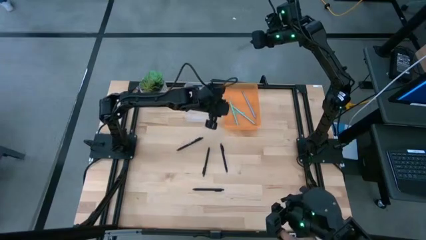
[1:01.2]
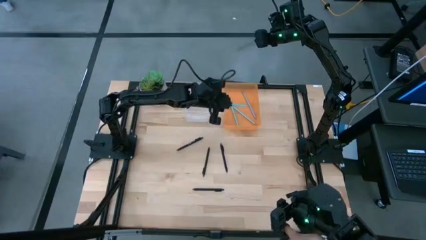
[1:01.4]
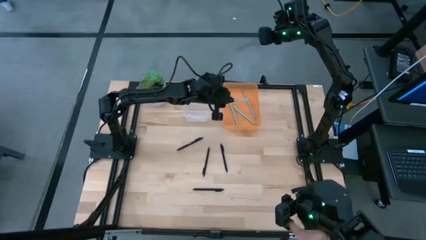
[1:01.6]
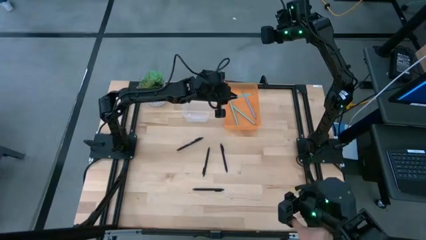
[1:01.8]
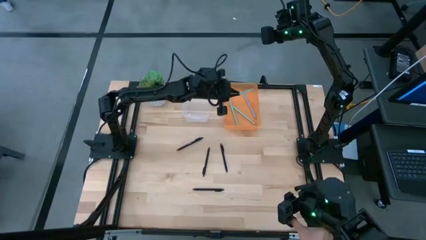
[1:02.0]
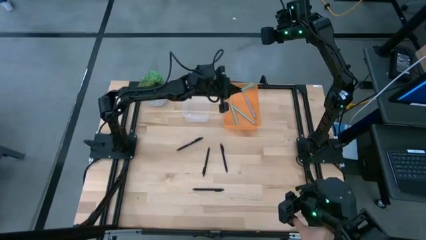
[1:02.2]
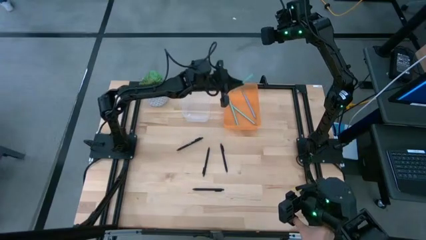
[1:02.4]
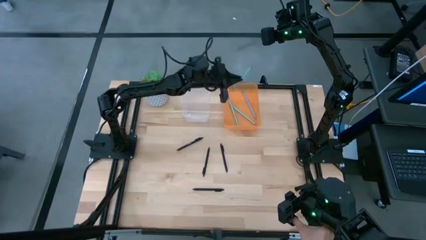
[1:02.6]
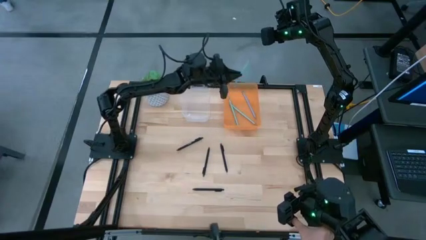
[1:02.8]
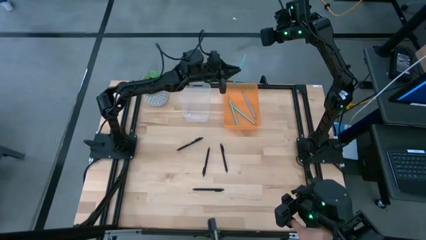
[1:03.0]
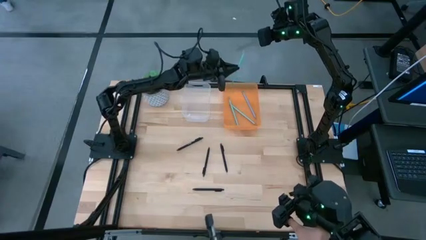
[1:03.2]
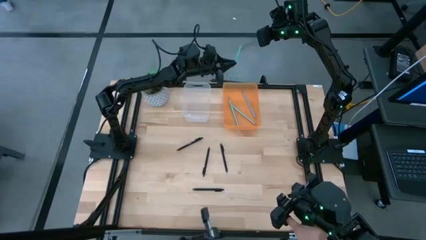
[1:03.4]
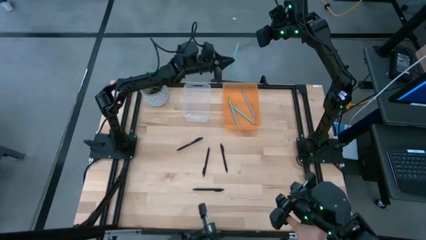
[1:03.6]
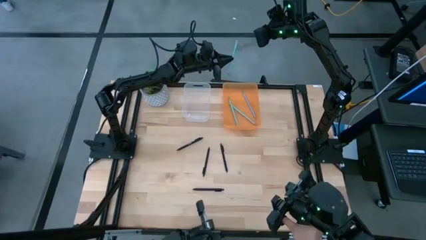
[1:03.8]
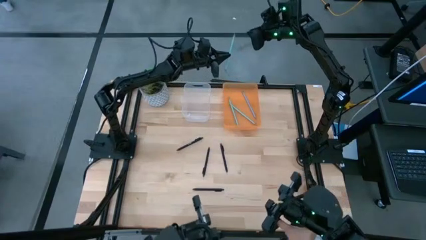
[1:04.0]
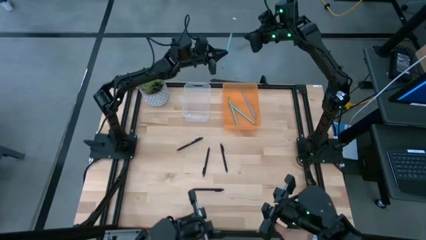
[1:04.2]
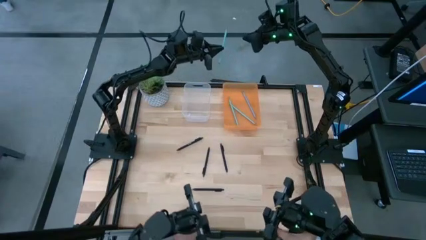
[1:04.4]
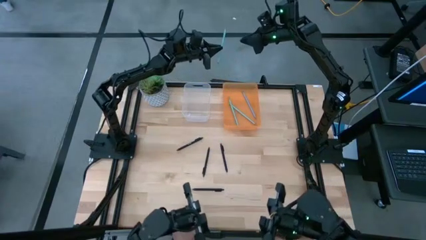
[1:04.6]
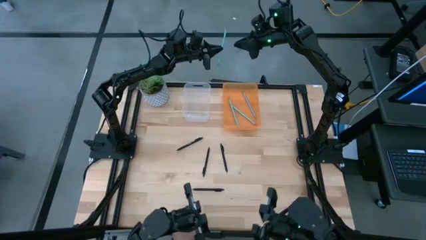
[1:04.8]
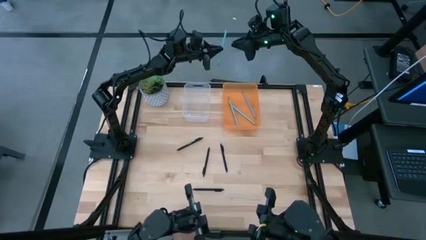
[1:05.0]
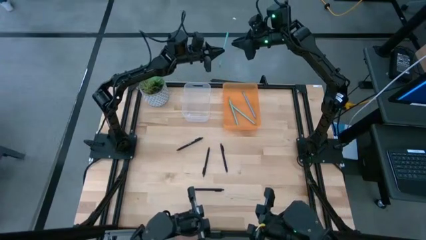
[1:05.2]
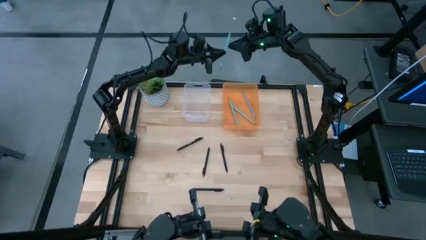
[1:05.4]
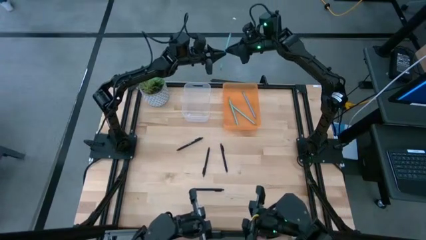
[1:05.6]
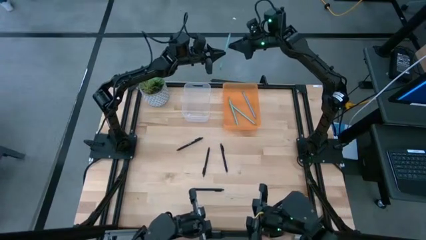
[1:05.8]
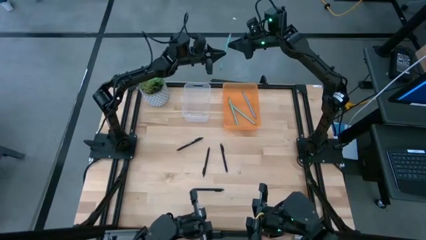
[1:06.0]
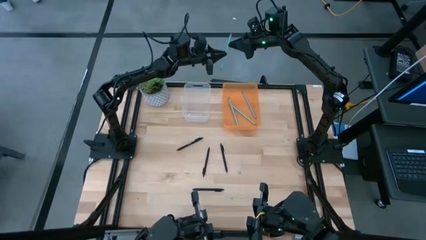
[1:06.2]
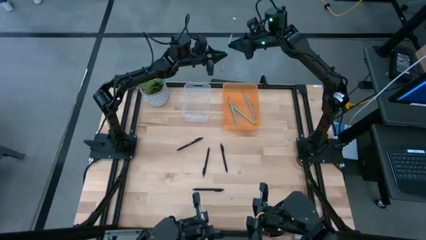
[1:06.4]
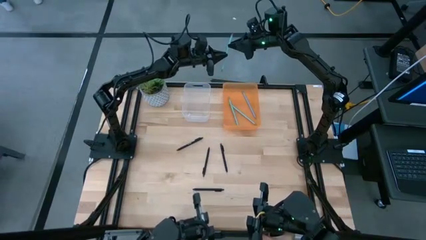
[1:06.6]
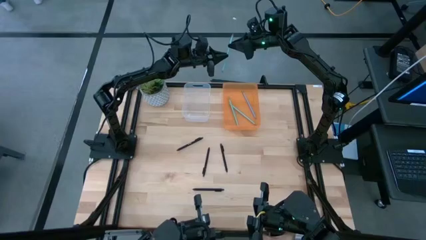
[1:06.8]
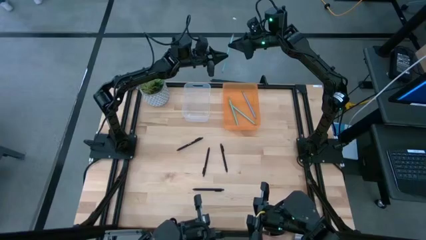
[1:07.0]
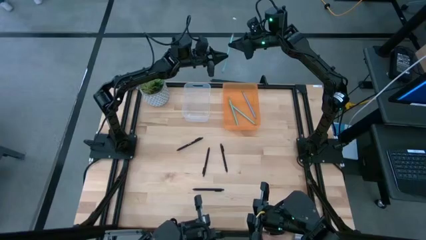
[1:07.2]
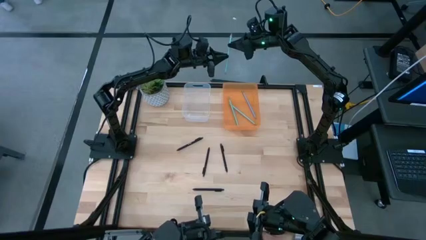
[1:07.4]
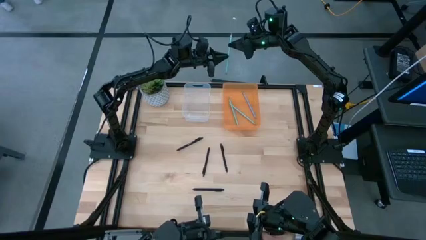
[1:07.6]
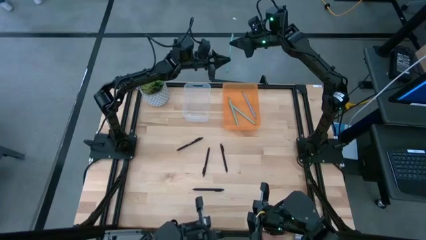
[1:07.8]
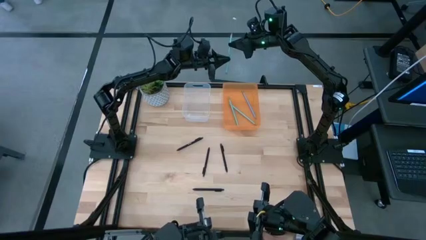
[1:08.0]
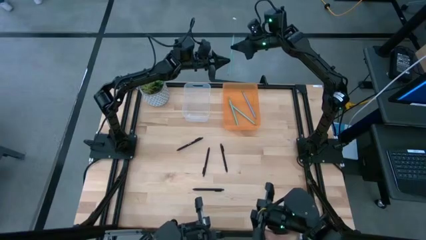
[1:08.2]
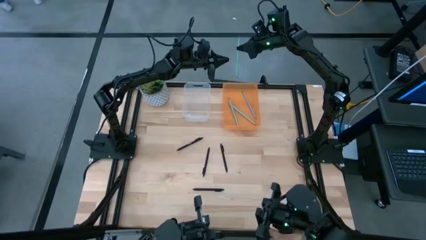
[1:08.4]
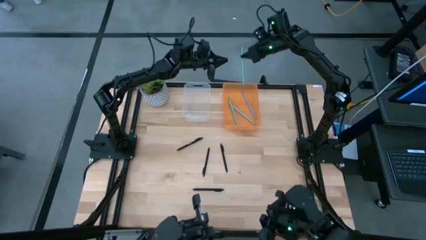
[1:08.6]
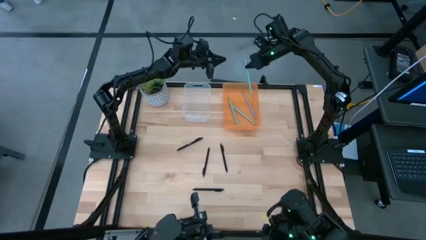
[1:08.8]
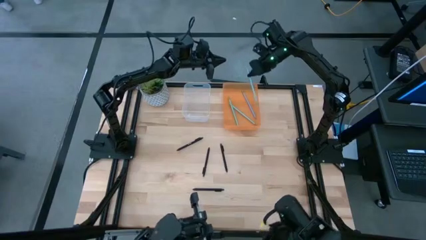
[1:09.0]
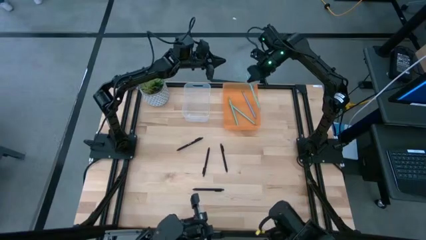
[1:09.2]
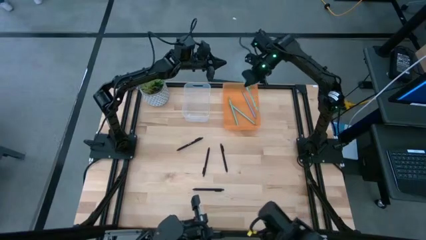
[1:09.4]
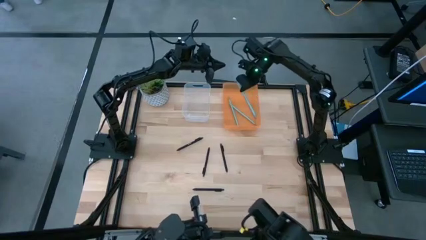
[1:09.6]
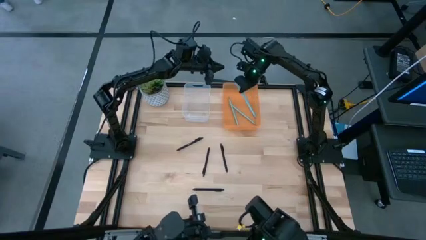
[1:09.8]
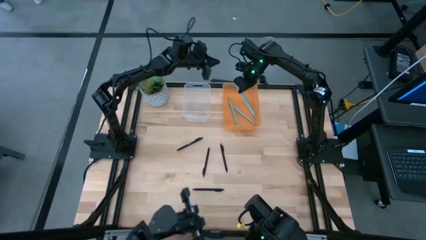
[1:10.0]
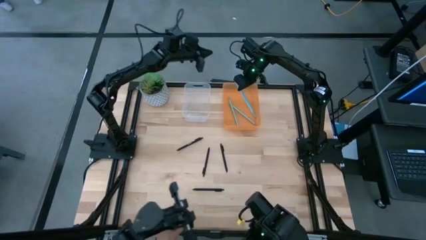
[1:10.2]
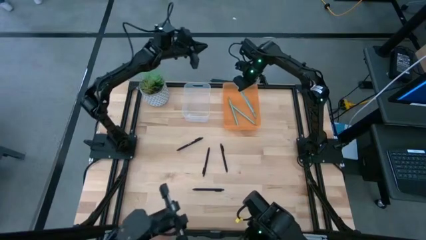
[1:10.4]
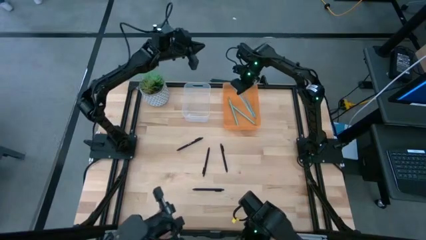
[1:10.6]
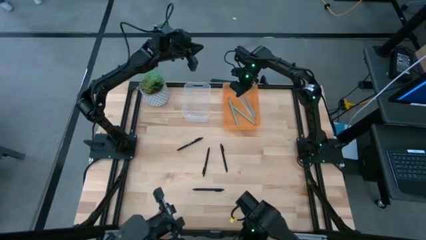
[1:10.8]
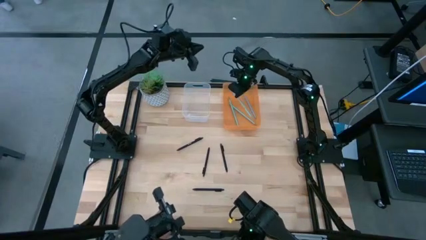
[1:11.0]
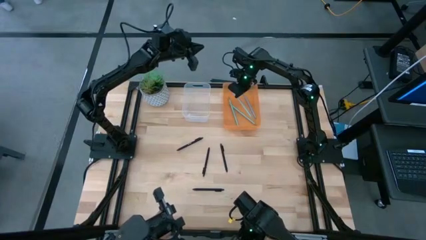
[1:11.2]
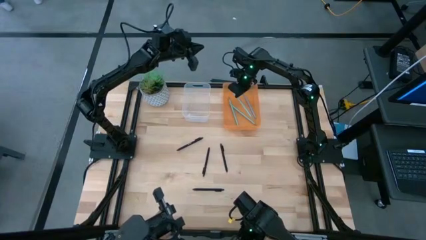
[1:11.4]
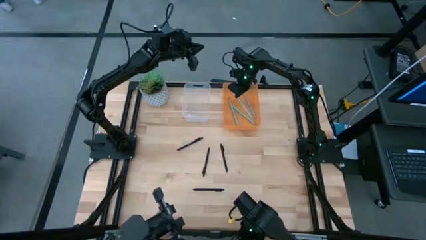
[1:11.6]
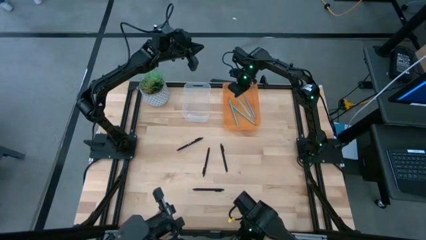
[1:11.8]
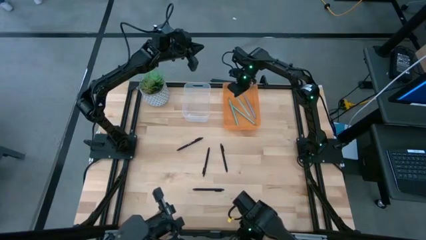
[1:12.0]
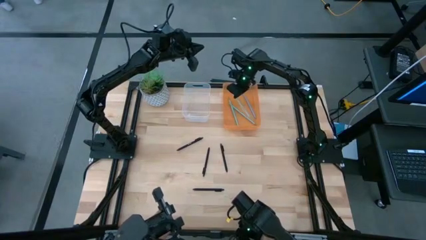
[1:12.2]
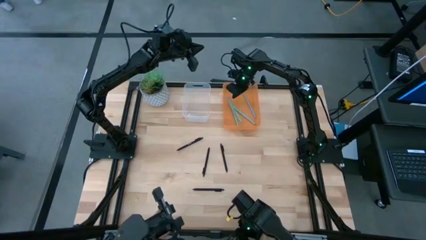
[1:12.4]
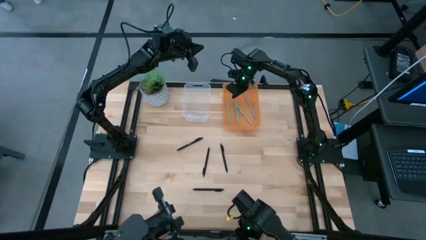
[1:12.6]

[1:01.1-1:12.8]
Task: Sort pens & pencils
Put the light green pencil into the orange bin

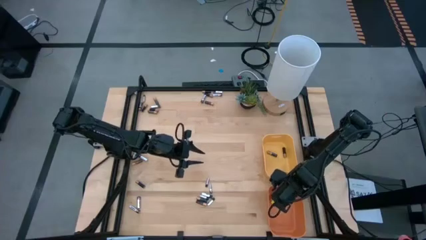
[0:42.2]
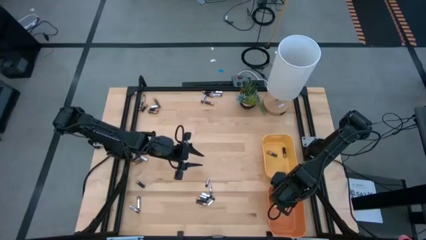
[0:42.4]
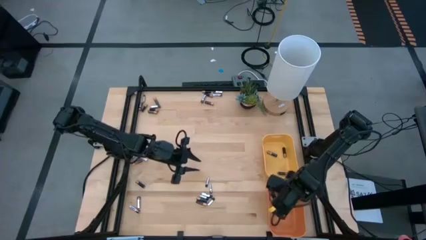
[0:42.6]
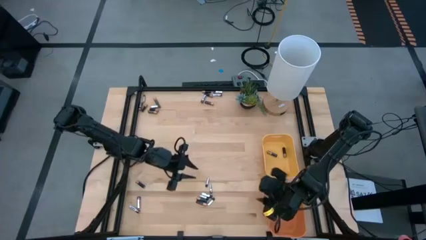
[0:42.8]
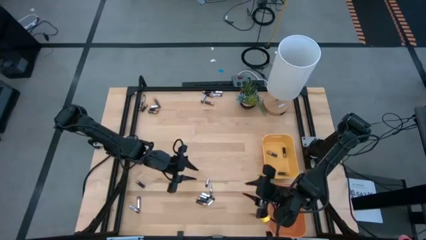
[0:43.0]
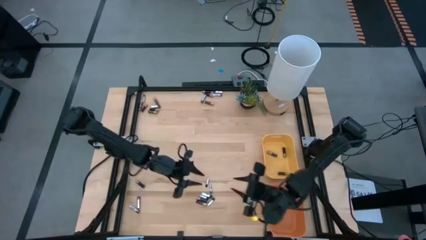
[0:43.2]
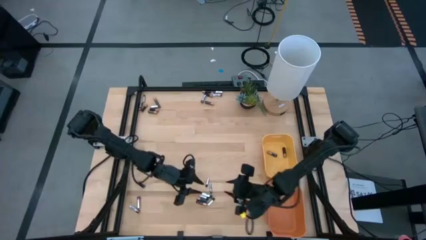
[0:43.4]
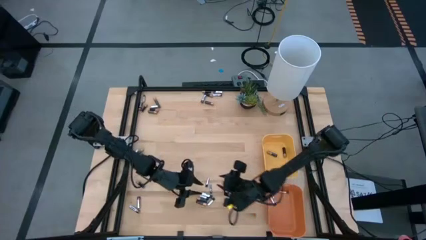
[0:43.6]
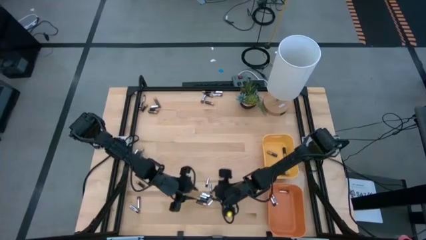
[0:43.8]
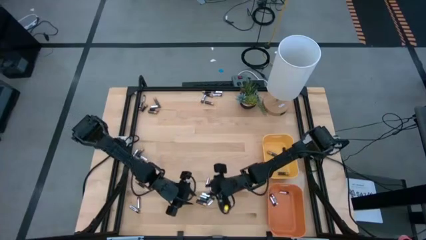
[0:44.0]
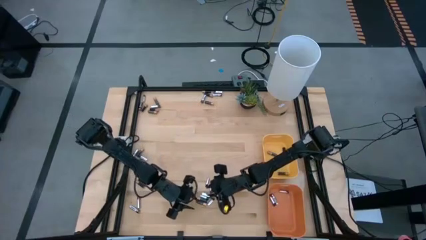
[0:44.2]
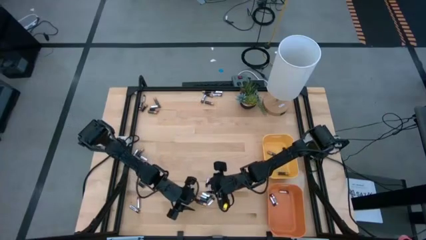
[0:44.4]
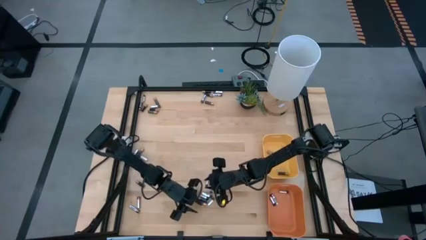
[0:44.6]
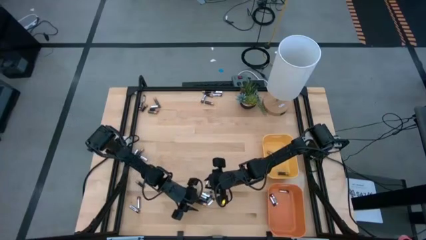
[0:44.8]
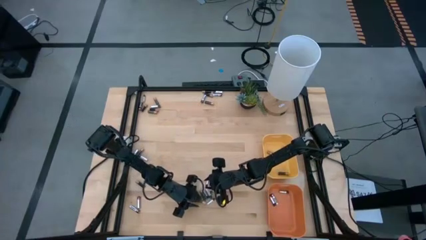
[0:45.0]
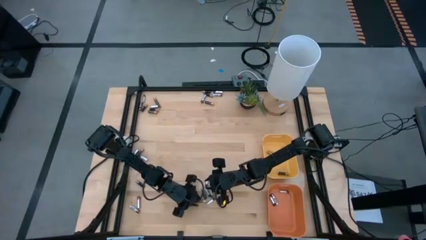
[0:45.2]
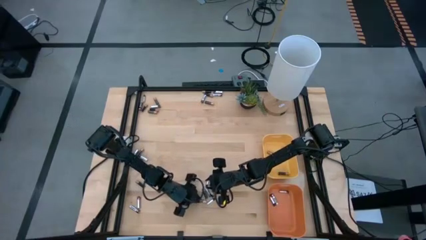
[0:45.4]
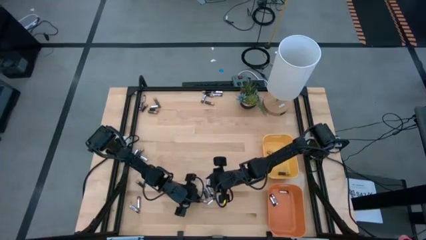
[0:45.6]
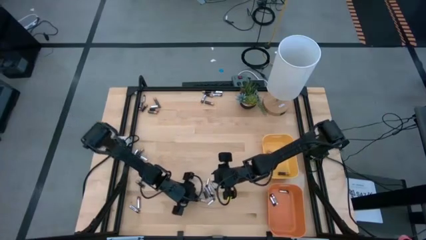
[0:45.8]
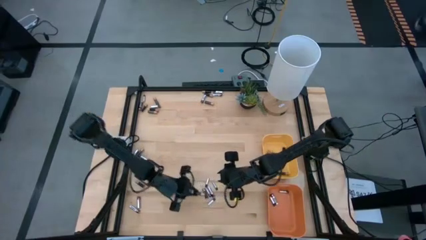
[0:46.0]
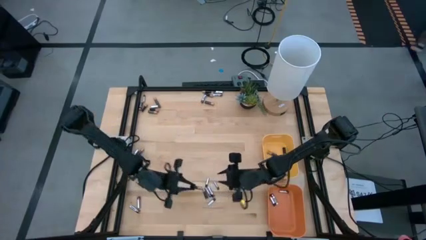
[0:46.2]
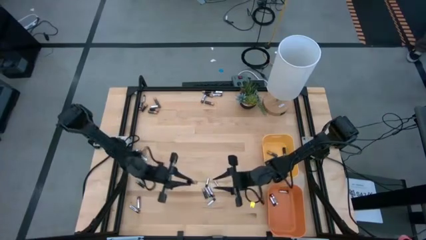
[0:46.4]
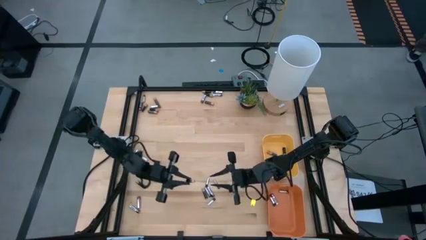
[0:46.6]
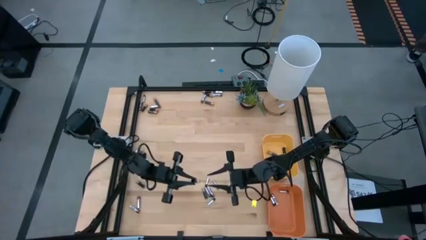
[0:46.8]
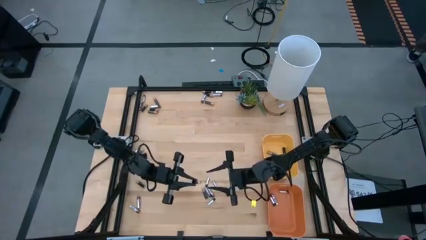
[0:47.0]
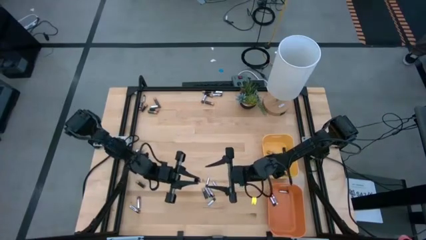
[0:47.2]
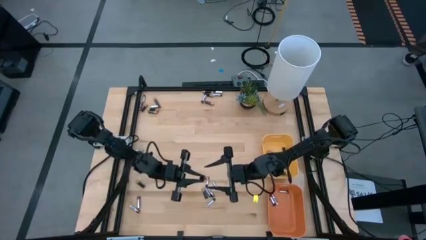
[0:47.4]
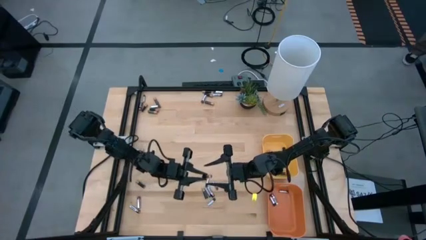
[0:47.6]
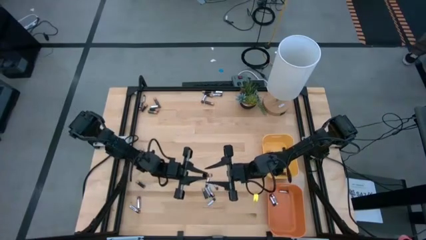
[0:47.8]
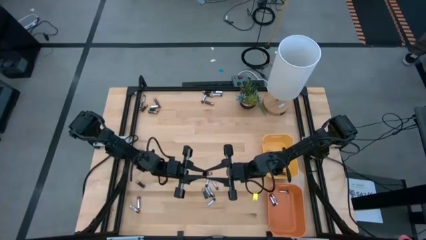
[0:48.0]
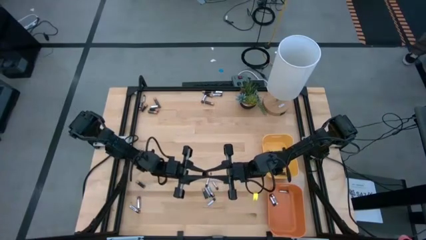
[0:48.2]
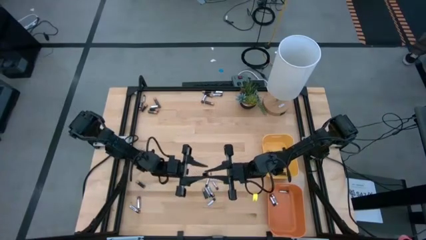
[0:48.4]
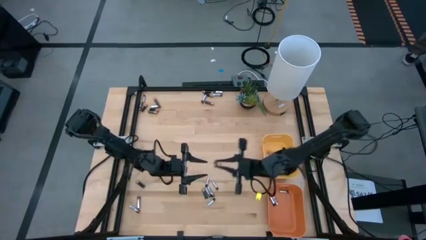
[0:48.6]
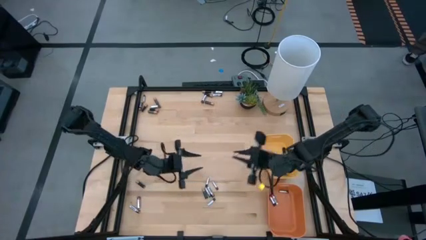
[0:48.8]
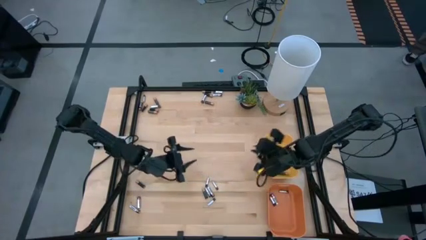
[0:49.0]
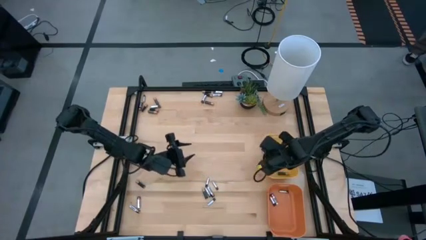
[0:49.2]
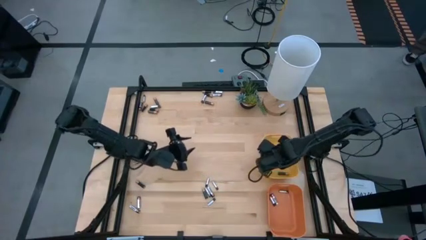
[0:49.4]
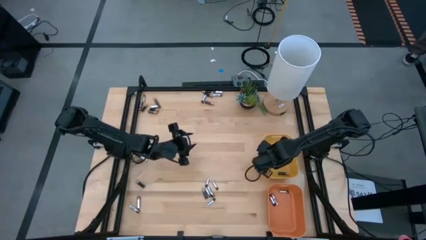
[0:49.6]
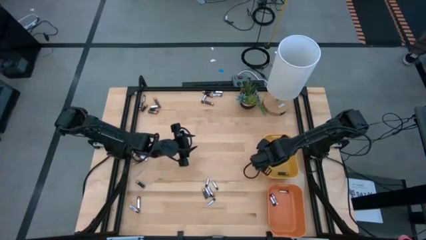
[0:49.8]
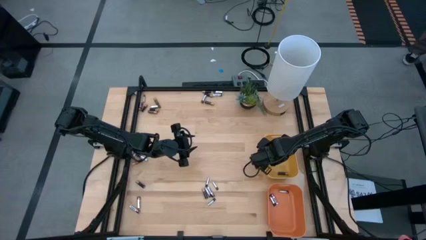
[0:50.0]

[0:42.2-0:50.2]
Task: Sort batteries
Put the brown battery into the yellow bin
